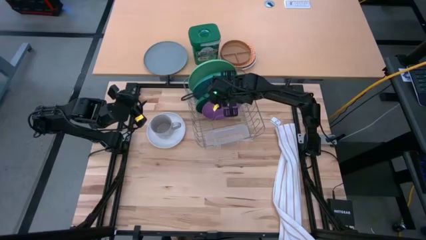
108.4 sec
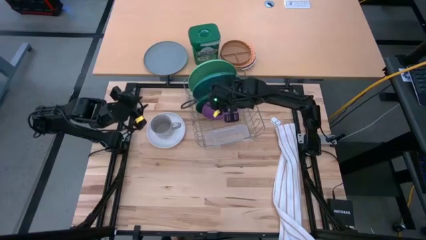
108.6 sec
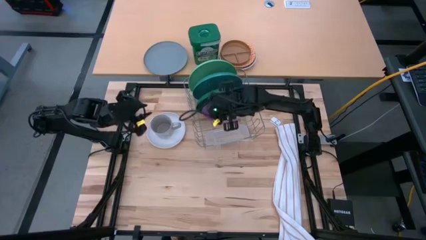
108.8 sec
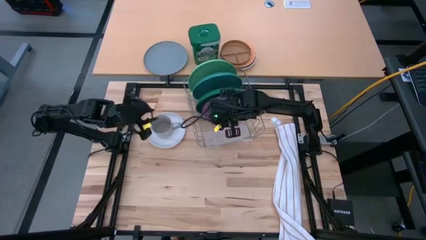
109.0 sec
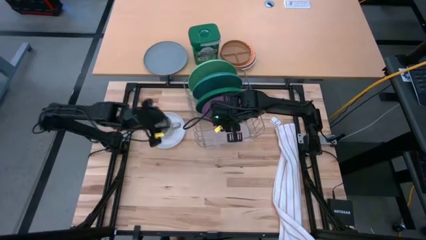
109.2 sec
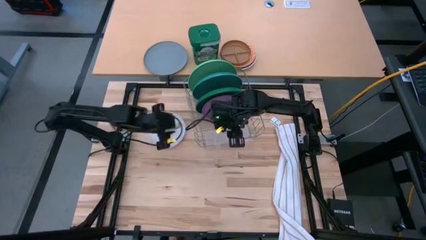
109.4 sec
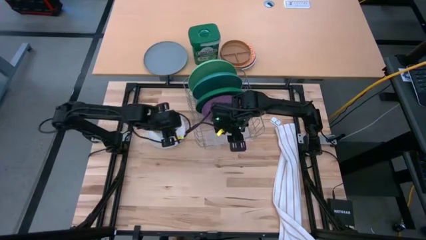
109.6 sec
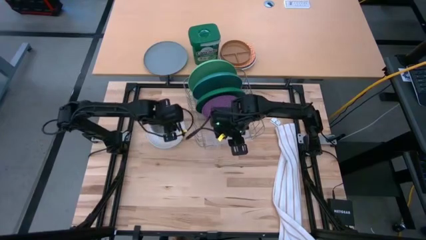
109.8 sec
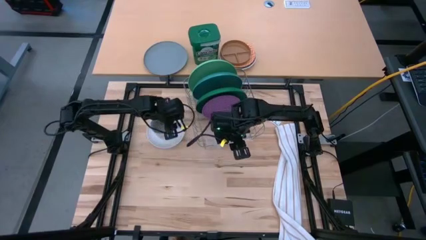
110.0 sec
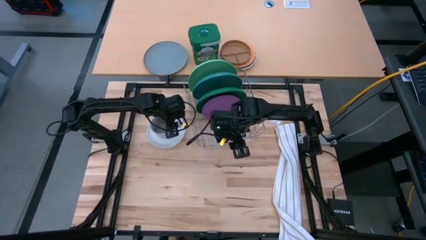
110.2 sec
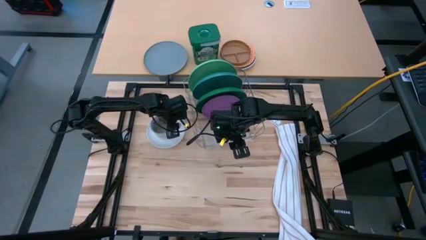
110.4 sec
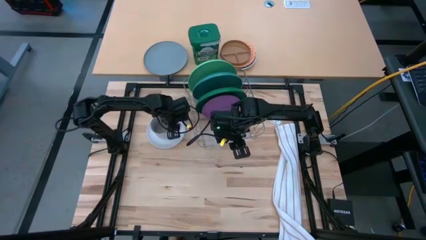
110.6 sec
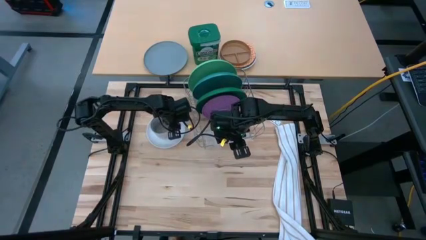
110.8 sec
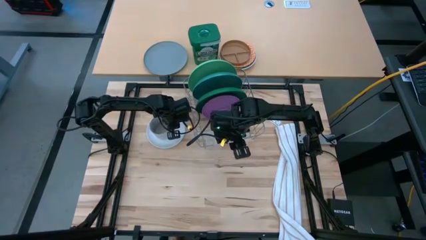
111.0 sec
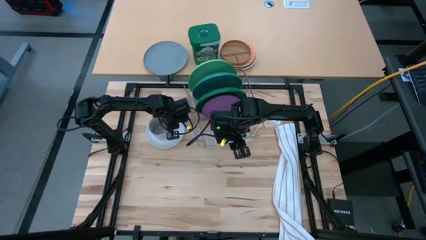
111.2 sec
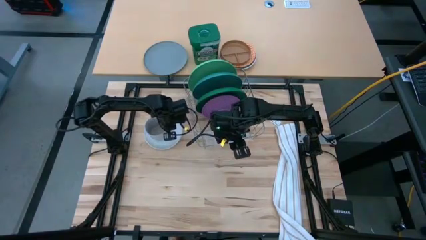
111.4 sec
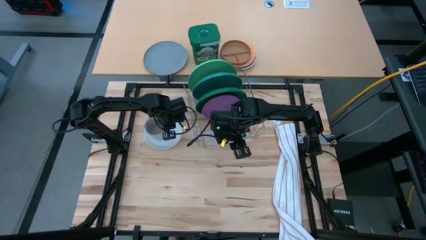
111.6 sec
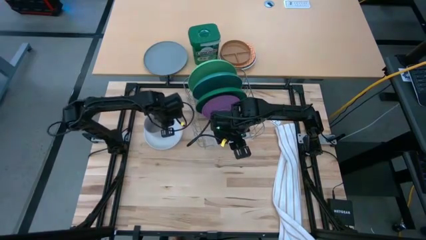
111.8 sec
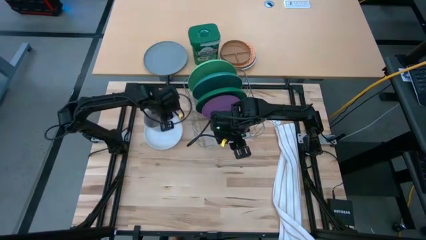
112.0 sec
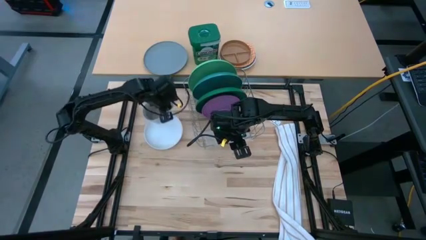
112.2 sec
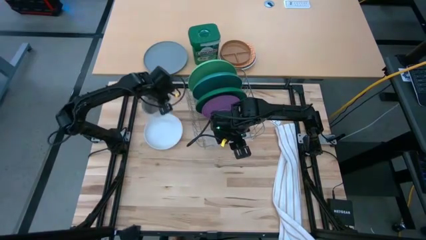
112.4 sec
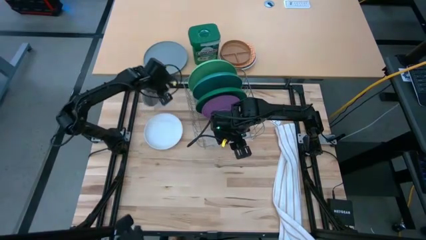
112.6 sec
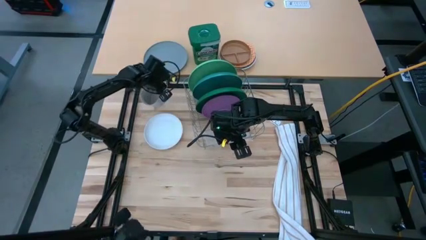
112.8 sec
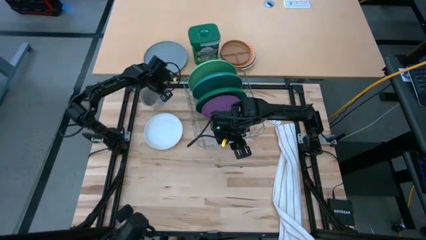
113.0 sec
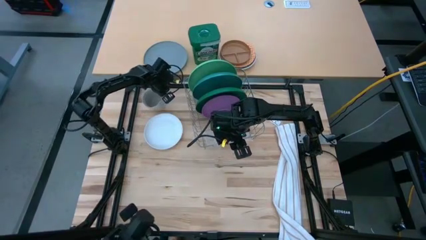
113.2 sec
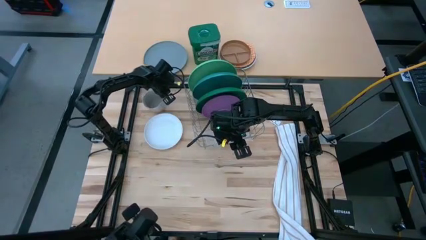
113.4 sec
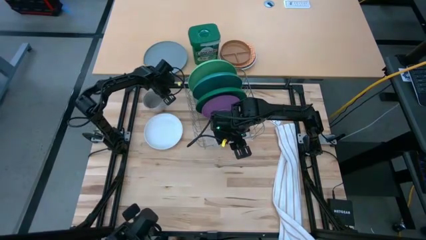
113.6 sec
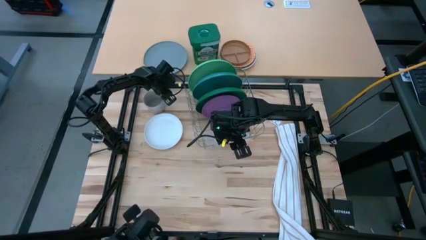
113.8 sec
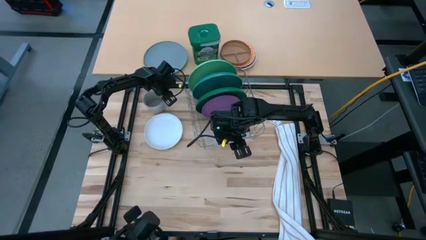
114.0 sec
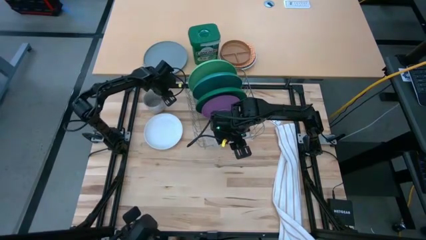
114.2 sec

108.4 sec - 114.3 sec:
Task: Sort dishes
Remove the gray mug from the white plate

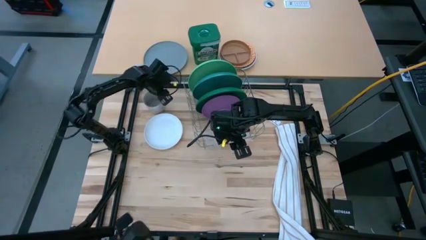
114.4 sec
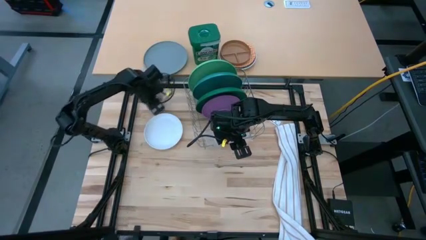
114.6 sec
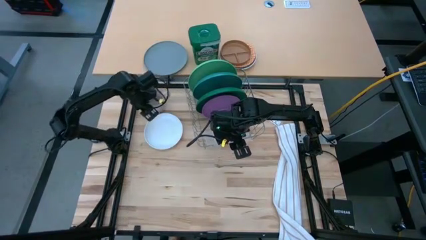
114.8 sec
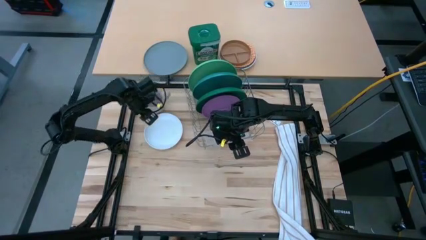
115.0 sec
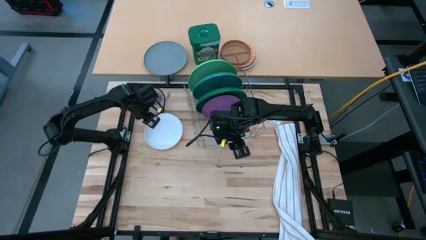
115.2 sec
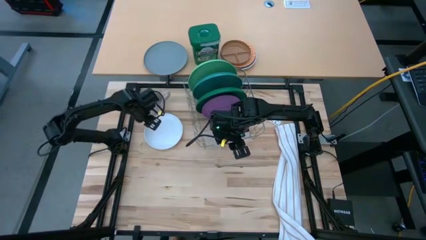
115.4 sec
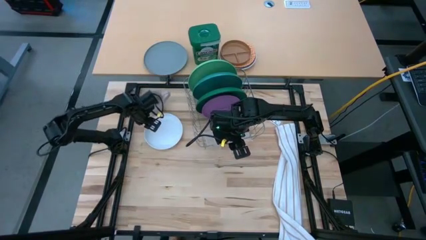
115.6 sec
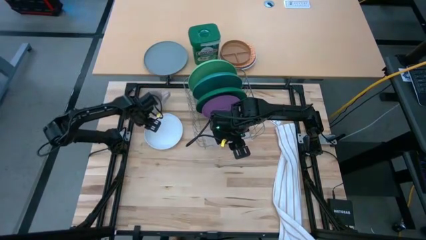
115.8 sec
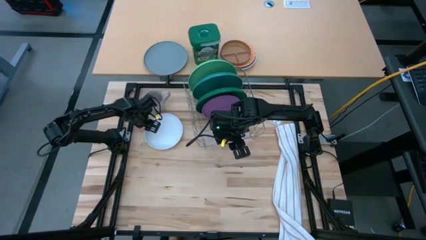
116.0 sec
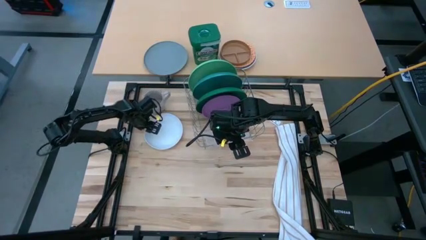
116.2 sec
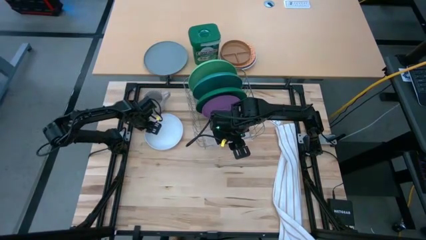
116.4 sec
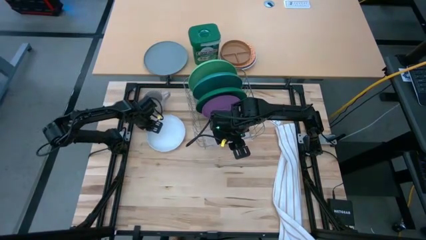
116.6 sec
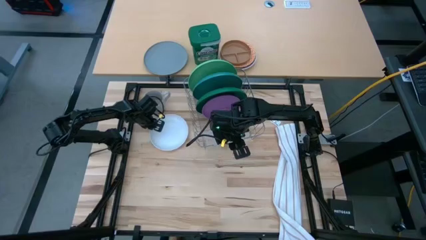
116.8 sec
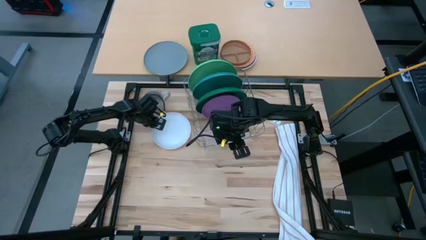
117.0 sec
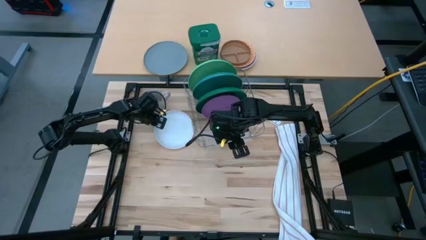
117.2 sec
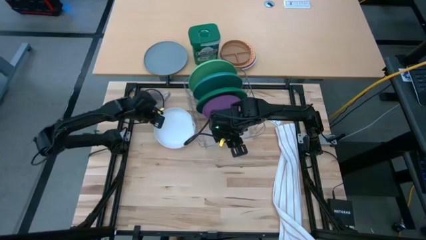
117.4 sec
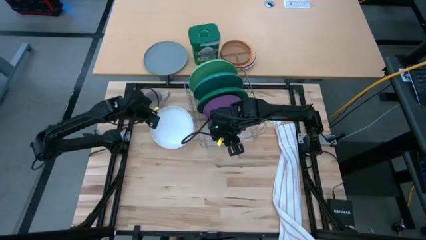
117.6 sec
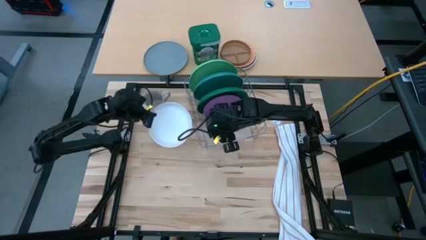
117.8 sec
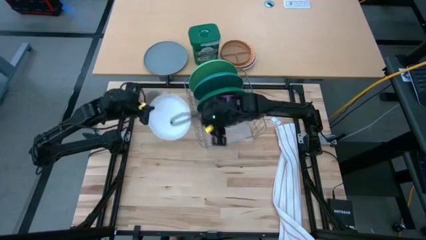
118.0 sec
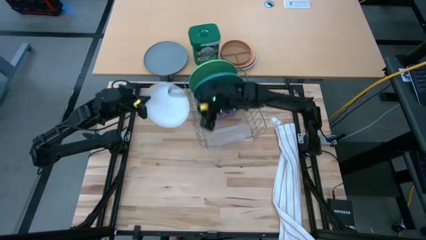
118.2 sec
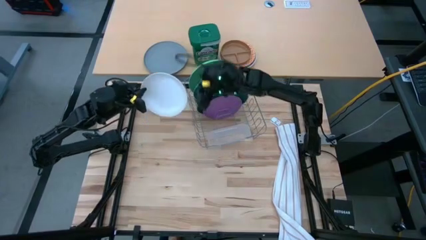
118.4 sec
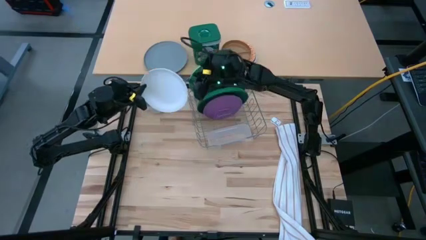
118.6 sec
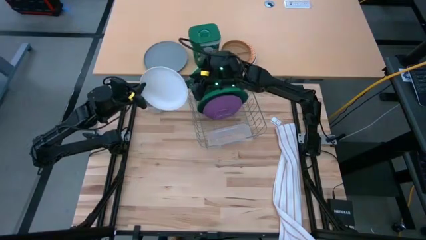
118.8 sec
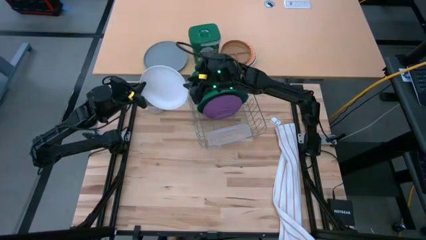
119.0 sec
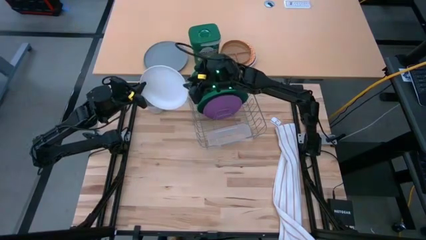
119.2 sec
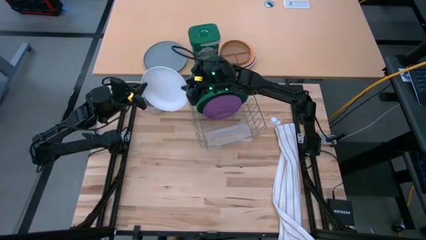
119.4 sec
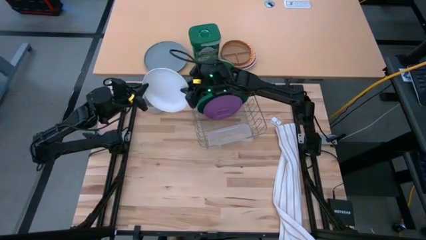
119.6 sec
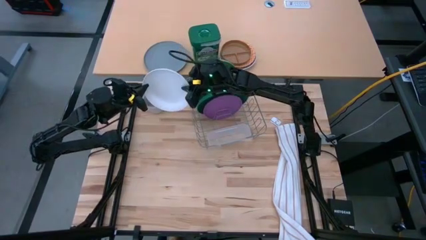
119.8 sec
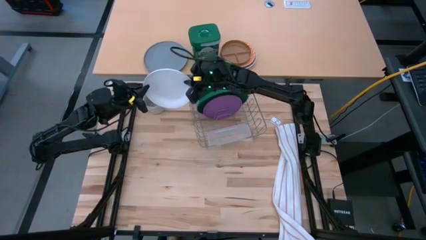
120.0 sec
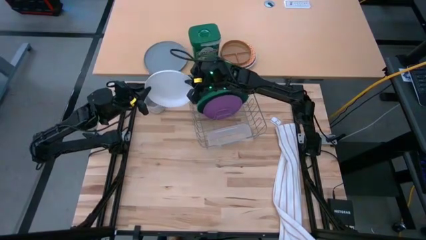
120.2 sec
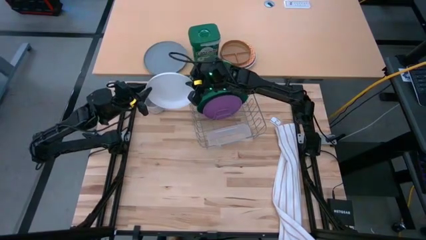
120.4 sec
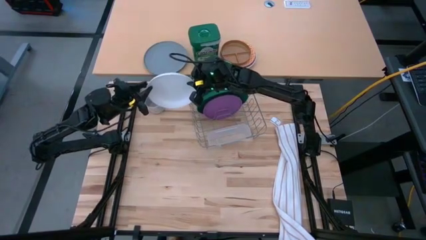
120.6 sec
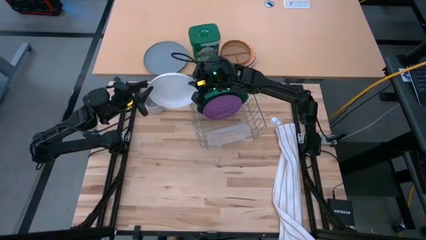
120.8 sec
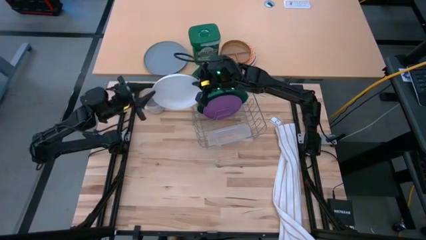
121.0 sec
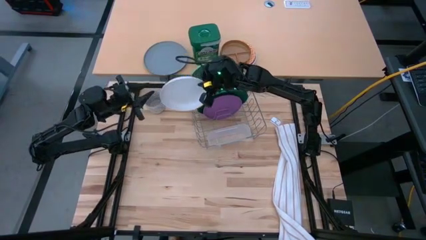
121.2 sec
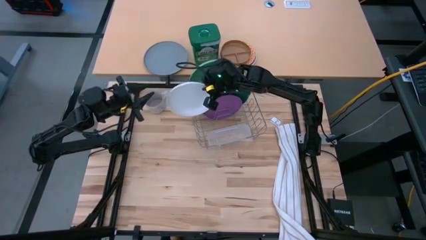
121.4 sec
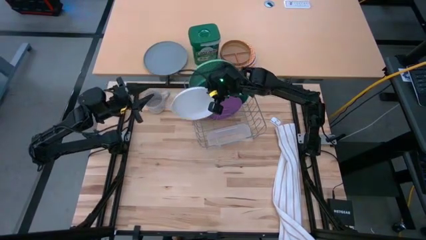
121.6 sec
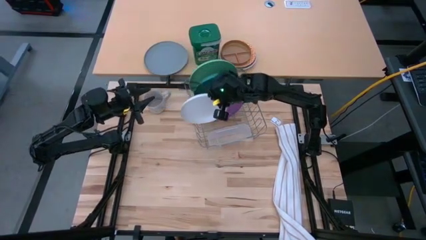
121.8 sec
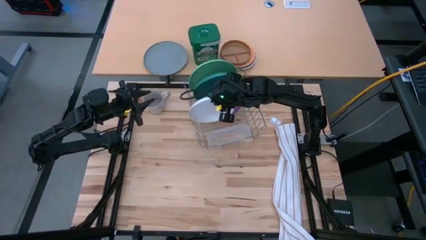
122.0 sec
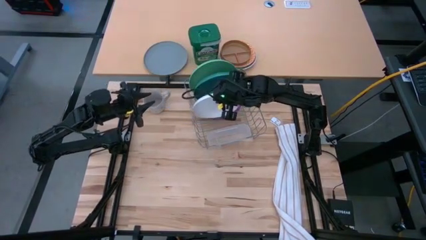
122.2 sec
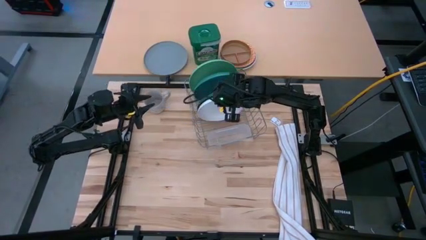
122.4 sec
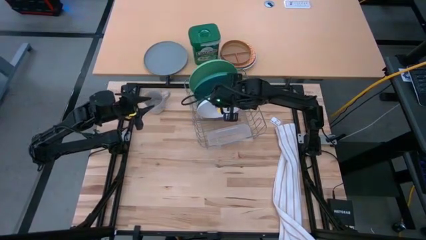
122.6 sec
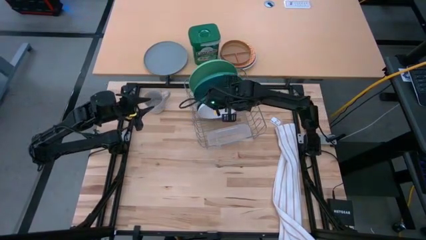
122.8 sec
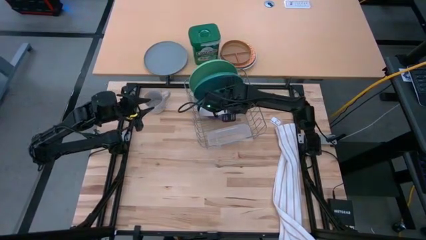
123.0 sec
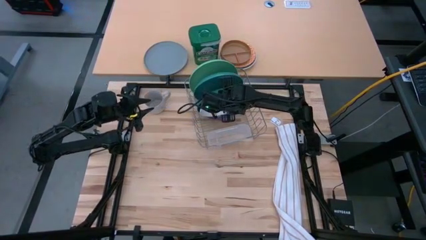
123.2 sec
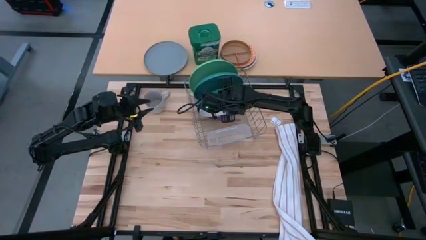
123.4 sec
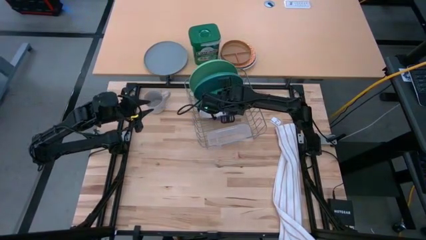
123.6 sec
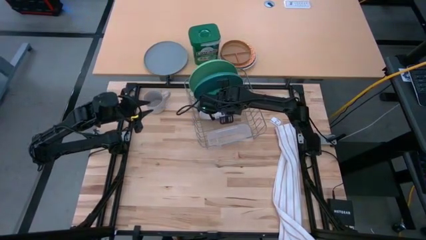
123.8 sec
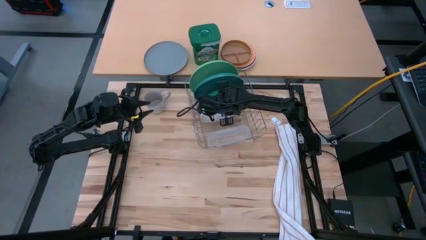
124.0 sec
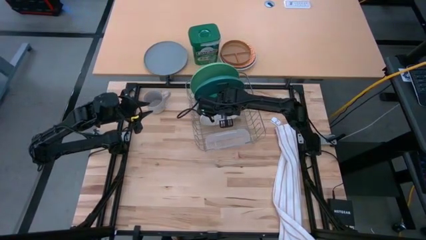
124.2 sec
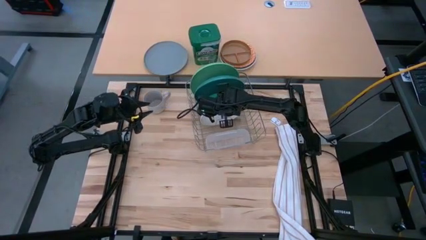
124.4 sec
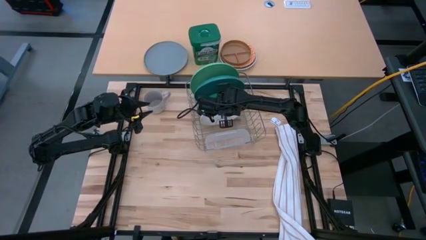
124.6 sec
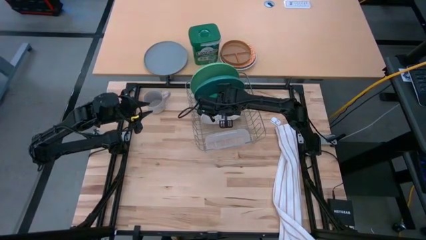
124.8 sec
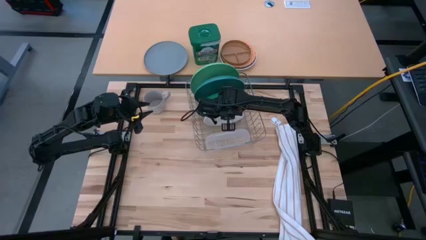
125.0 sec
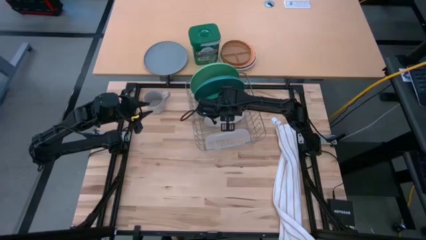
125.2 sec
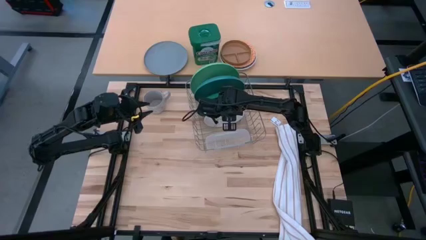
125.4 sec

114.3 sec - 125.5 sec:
Put the white plate into the dish rack

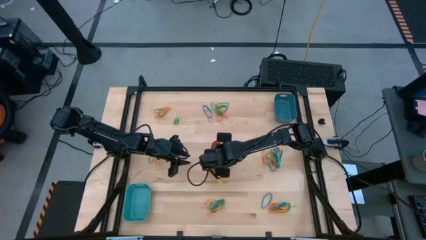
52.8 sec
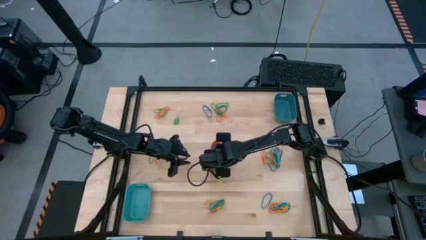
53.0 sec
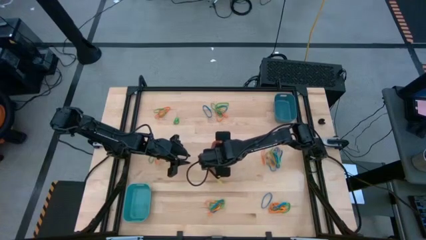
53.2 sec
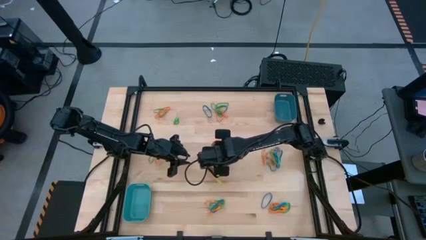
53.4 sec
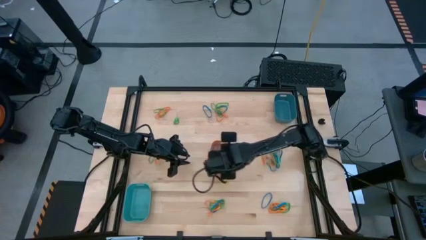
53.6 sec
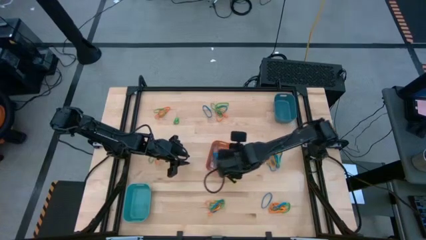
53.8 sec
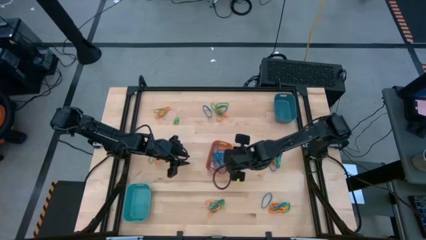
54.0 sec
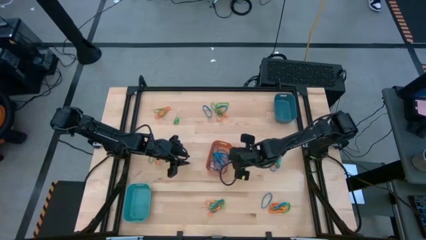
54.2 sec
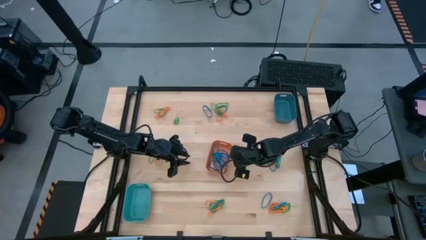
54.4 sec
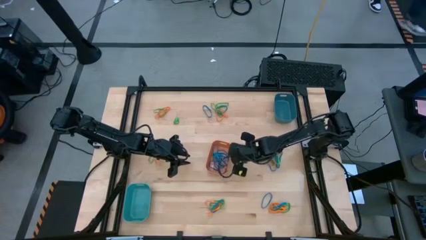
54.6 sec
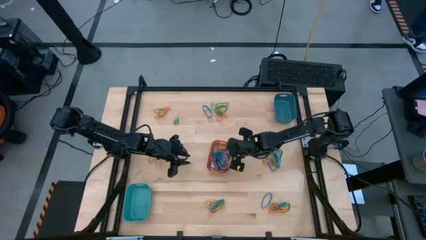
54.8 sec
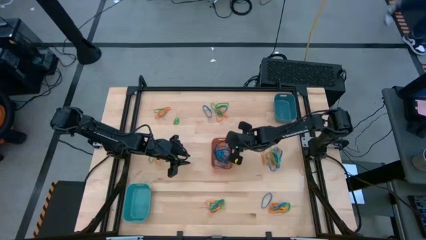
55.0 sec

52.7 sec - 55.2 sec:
Task: Sort rubber bands into baskets
Adjust the orange bin
